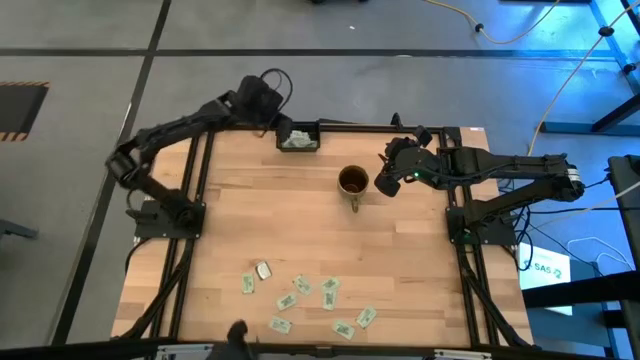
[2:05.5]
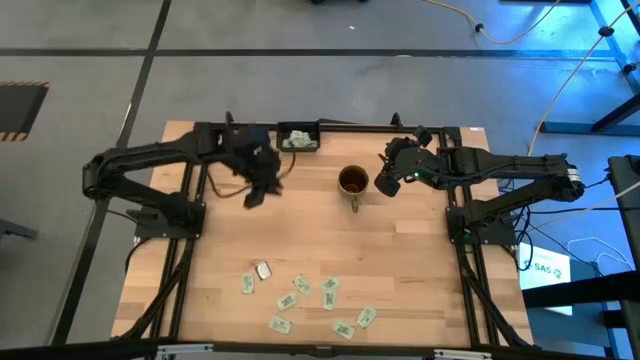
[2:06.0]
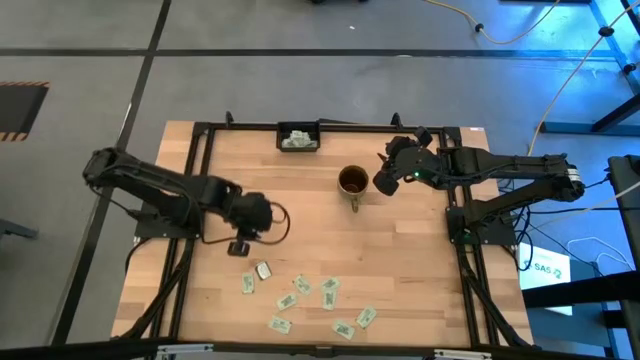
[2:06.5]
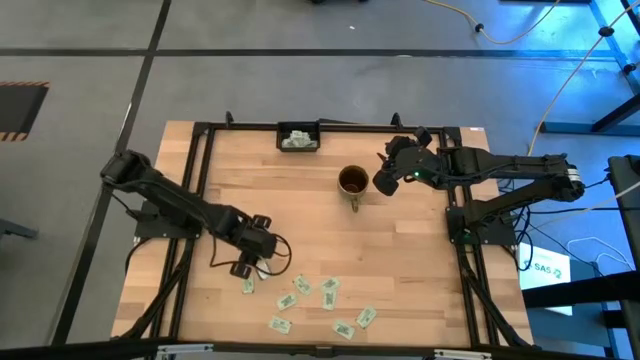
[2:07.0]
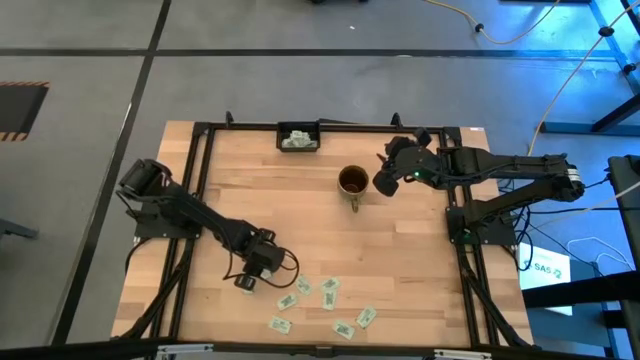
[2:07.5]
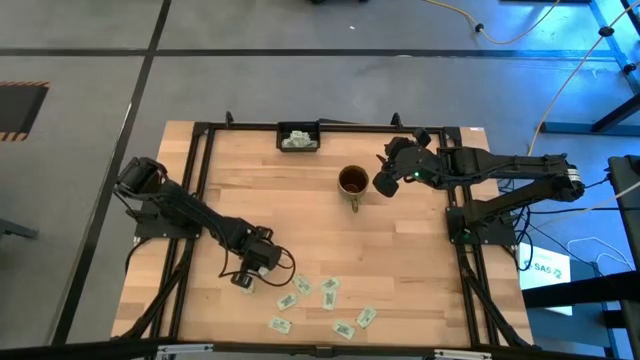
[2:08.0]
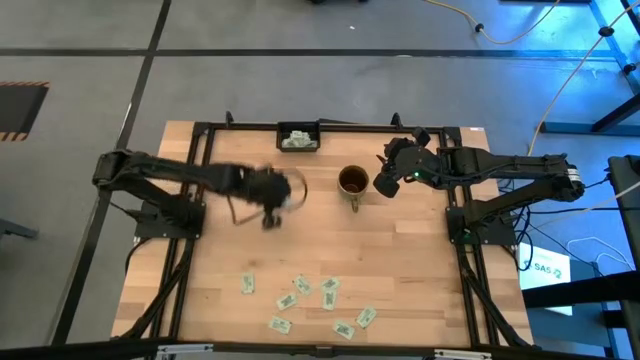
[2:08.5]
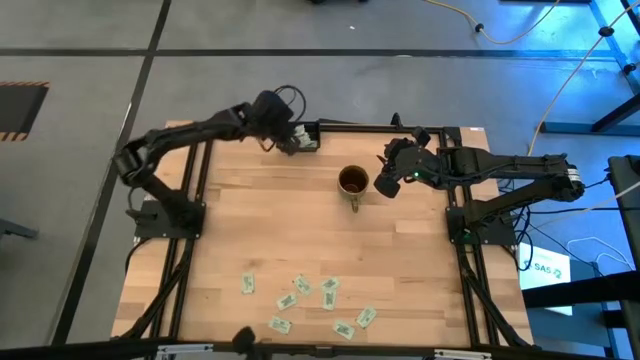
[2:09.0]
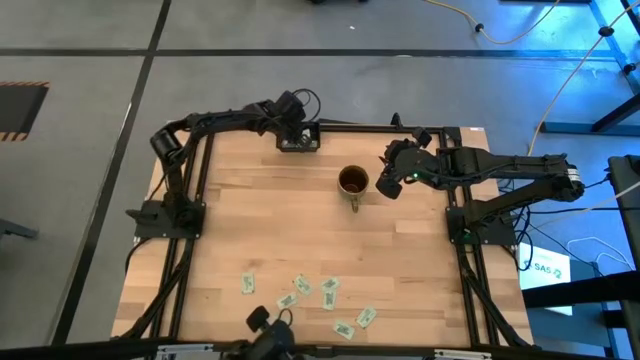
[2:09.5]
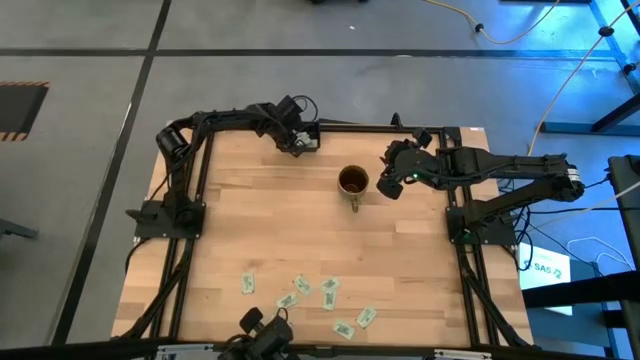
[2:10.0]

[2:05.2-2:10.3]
Task: Pick and place Stevia / Truvia into bins
Put the stevia packet into the black container

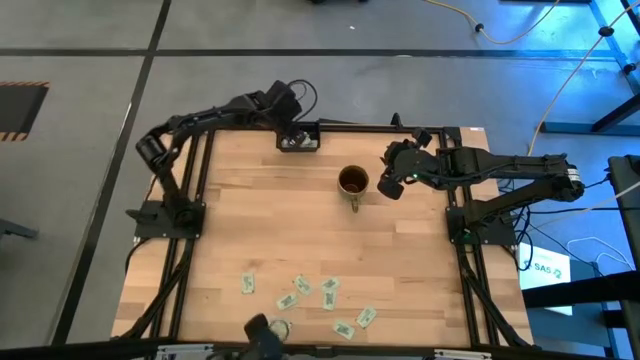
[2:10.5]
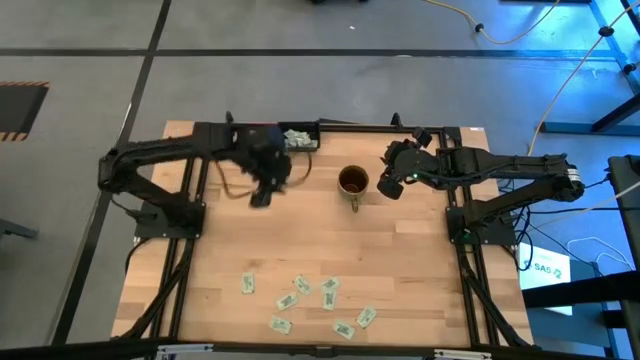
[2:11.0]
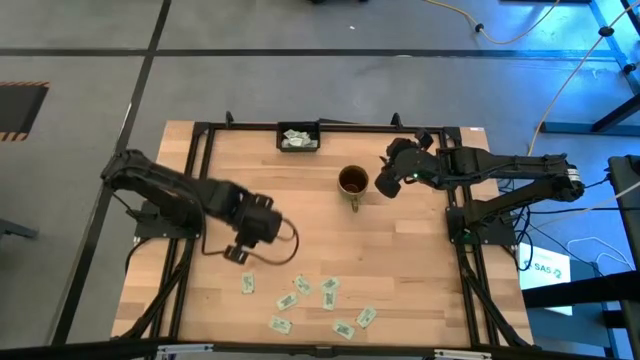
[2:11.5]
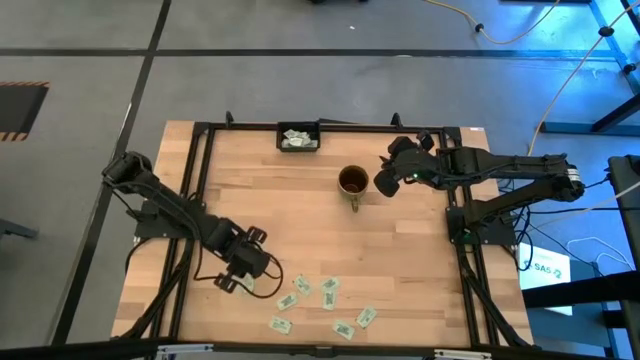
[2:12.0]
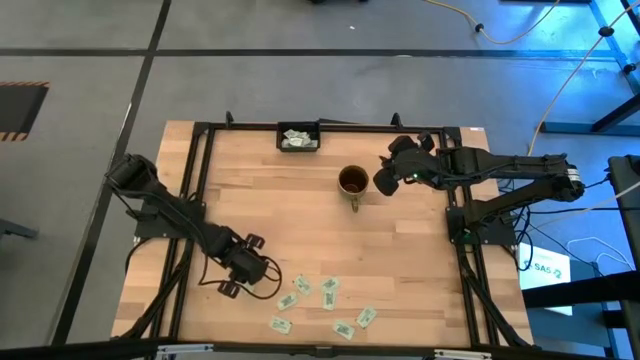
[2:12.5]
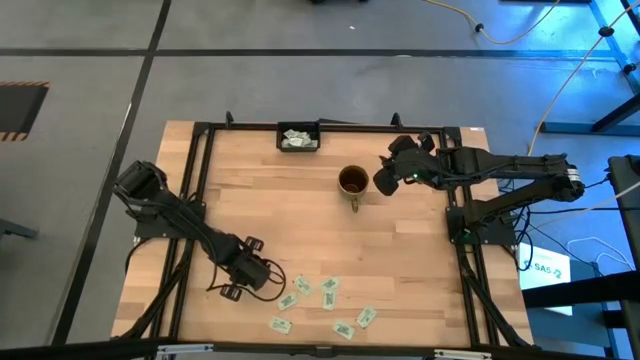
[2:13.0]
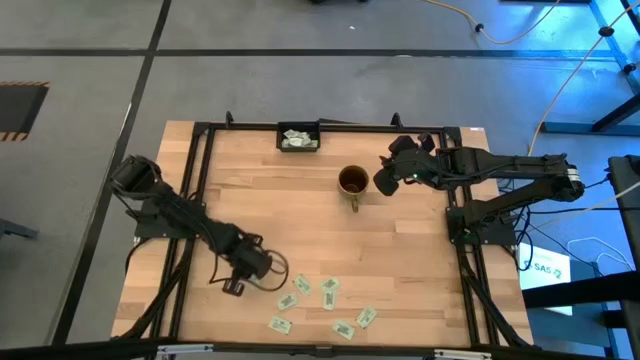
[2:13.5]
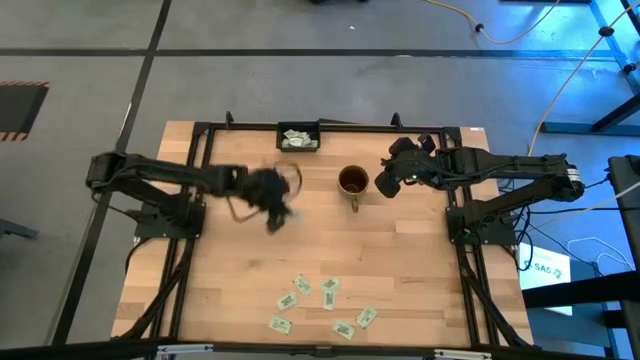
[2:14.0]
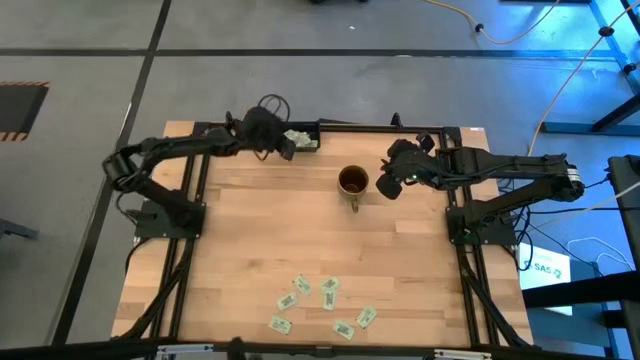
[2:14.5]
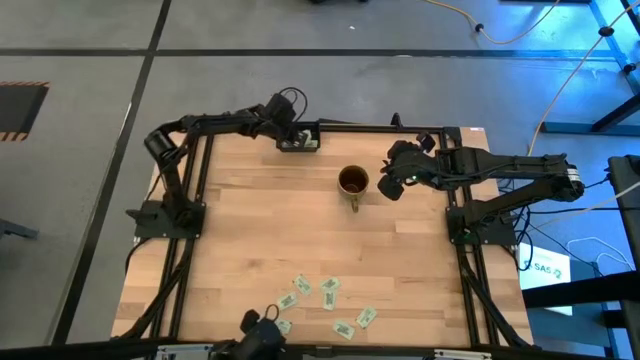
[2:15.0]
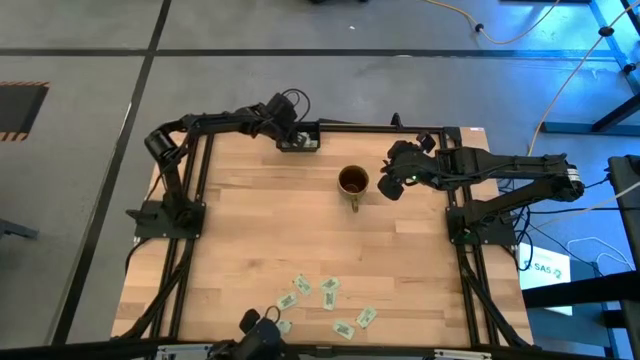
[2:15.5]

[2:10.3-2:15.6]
Put the stevia packet into the black container

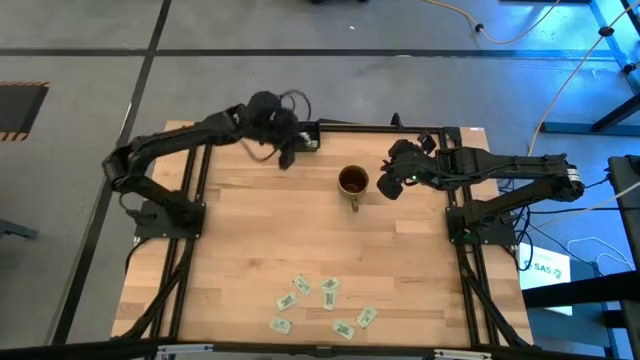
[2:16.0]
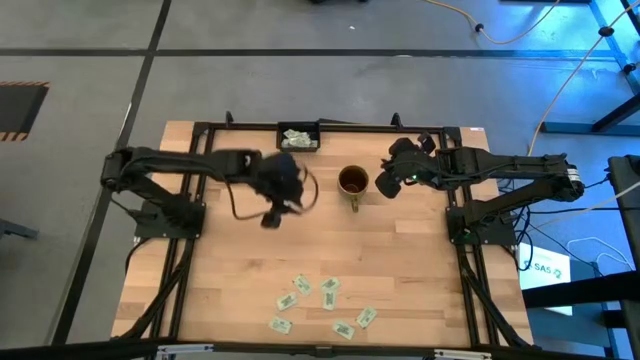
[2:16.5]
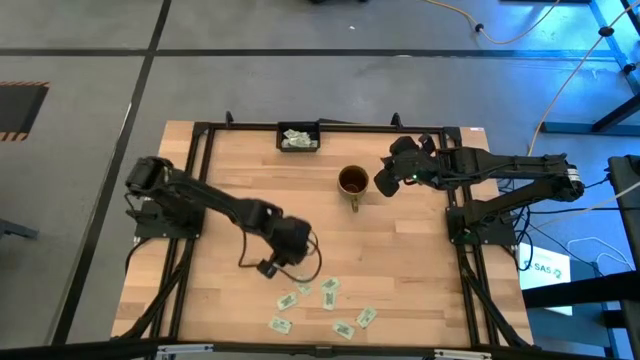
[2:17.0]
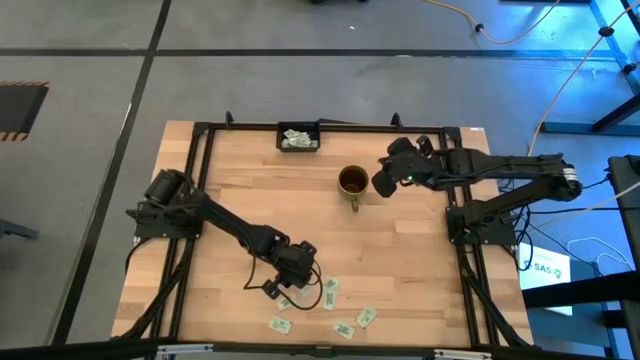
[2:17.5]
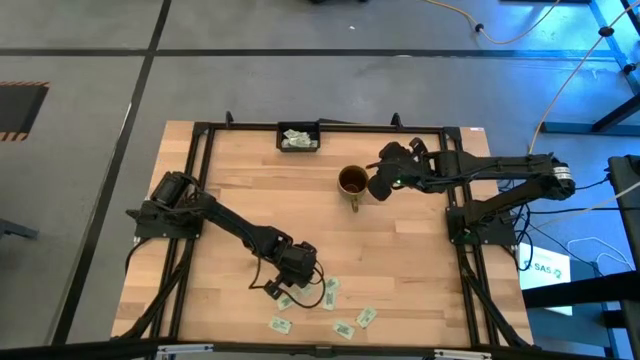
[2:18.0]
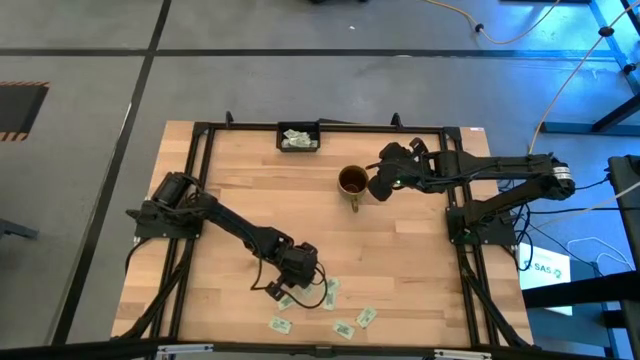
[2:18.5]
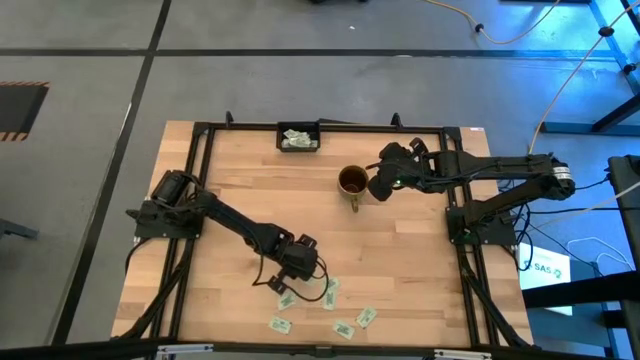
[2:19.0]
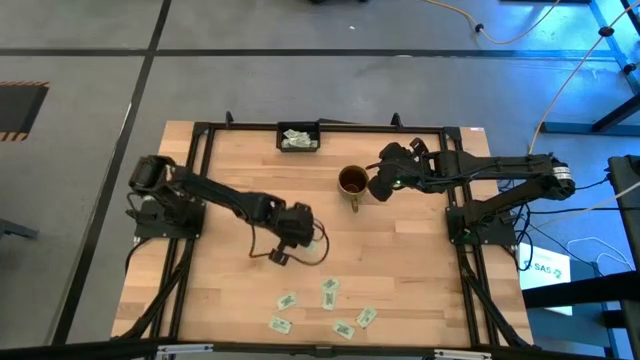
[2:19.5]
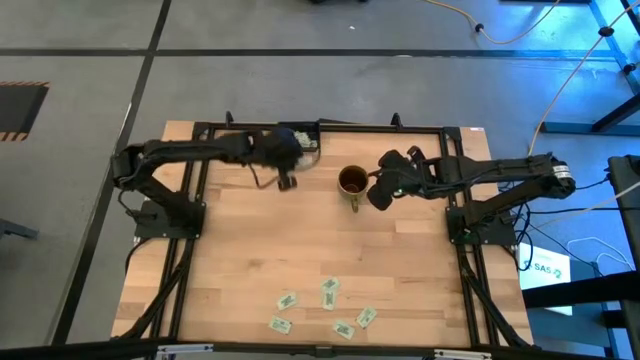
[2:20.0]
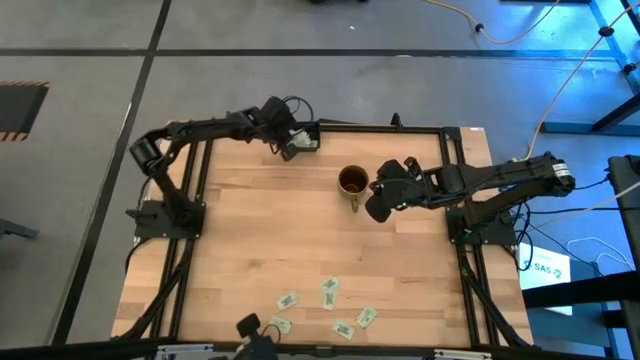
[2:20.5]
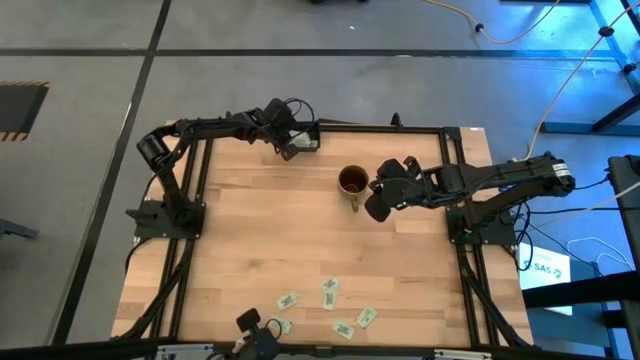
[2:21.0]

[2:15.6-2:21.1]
Put the stevia packet into the black container

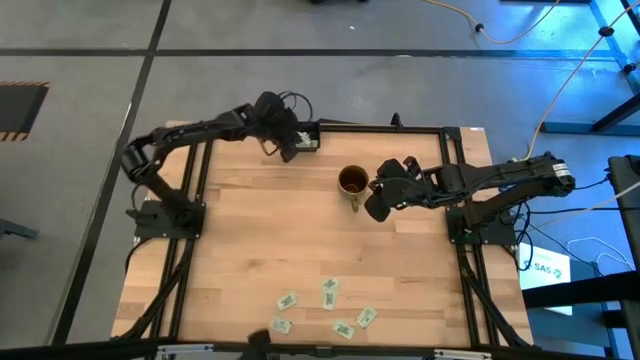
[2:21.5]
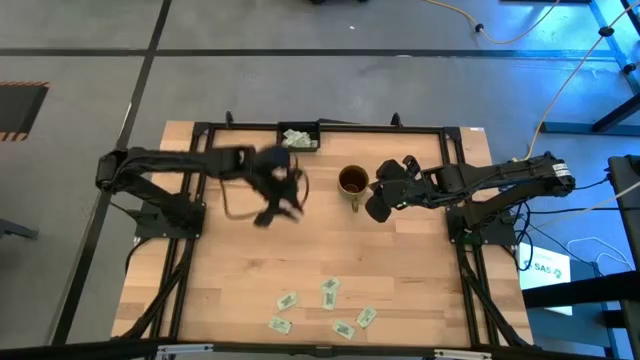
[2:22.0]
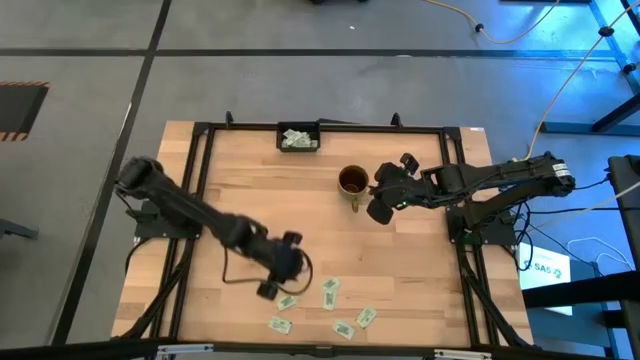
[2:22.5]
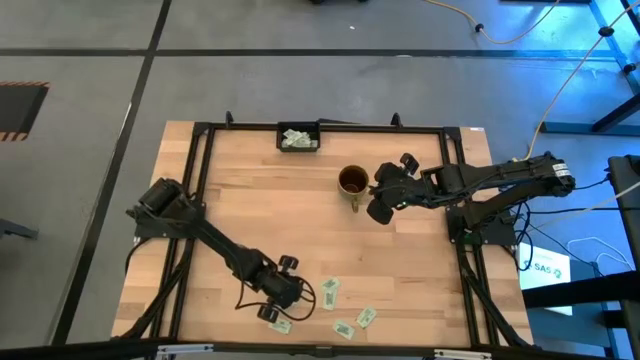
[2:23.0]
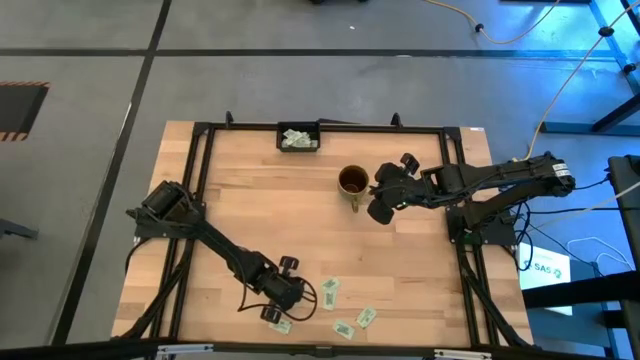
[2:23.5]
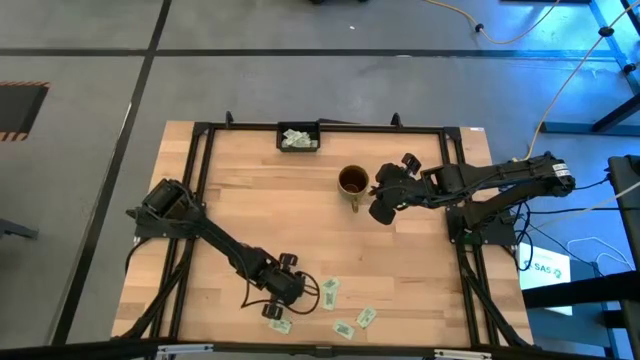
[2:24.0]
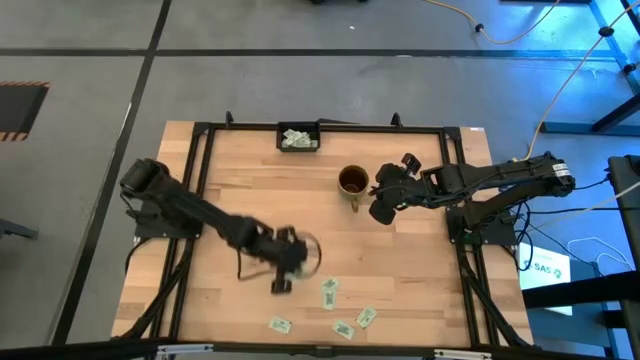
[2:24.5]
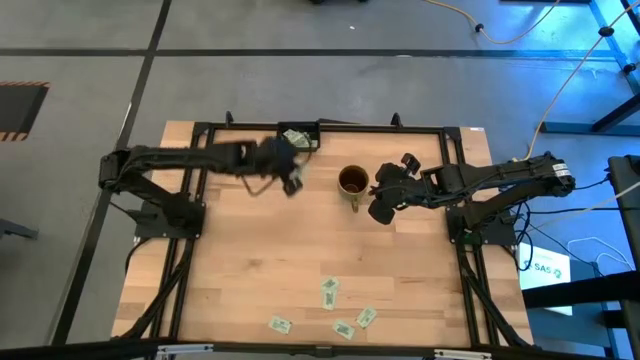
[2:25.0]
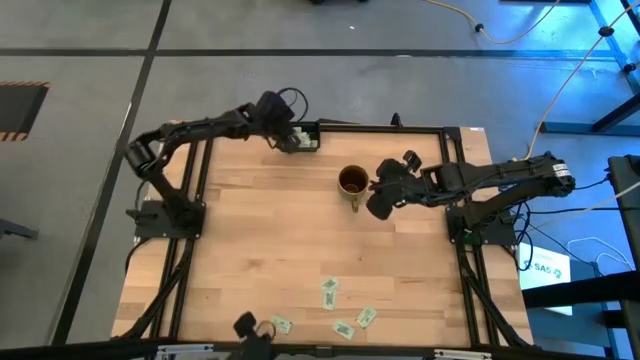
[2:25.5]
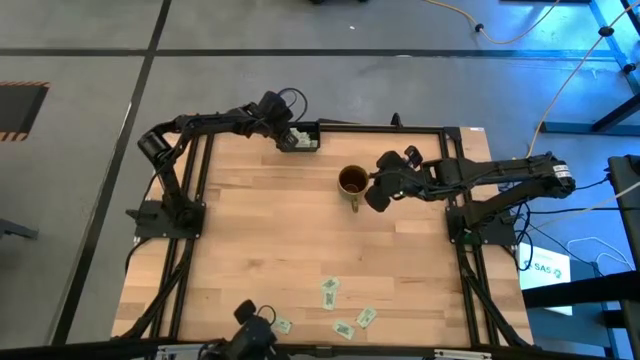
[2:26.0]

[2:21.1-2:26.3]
Put the stevia packet into the black container
